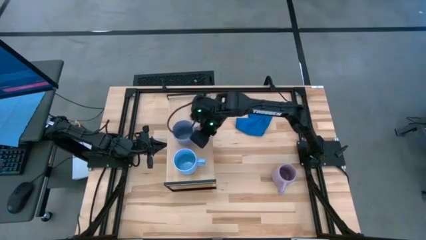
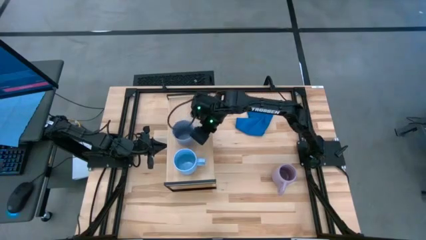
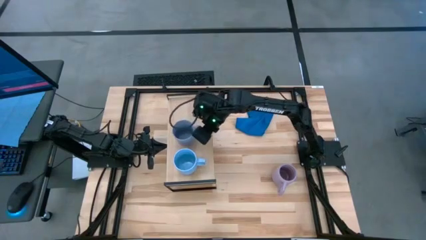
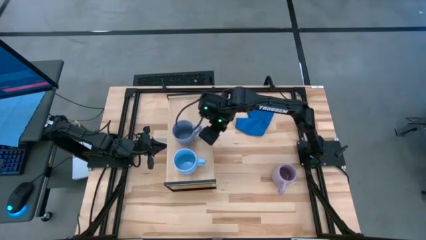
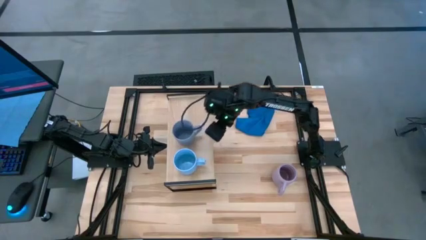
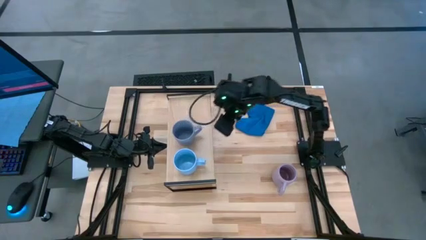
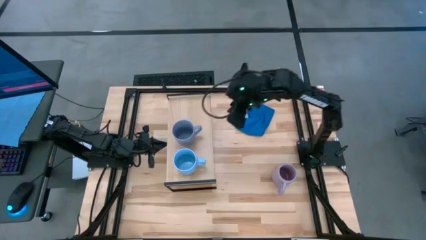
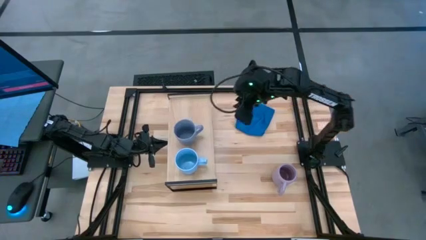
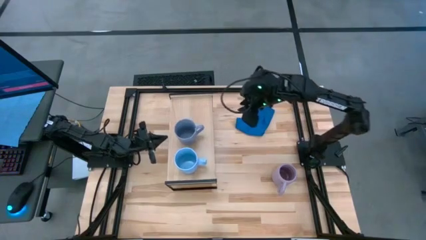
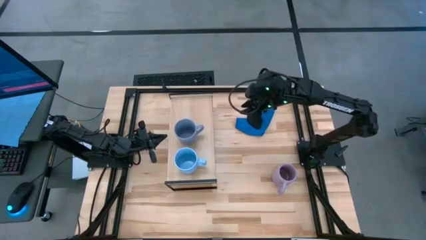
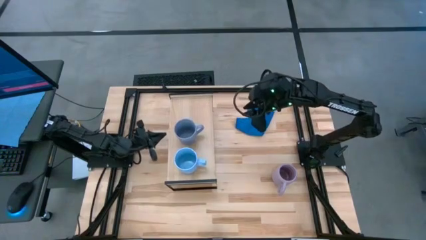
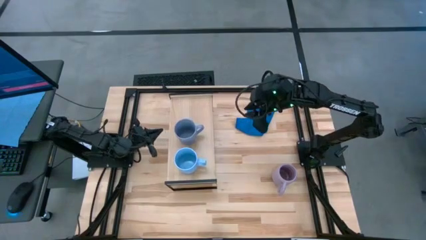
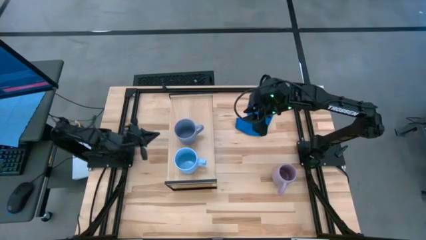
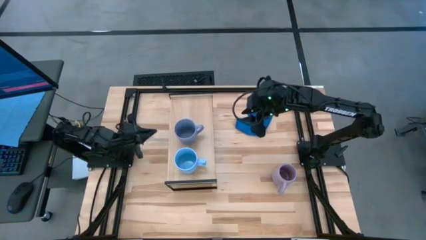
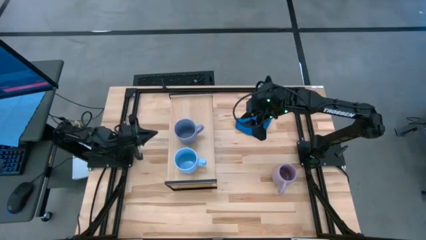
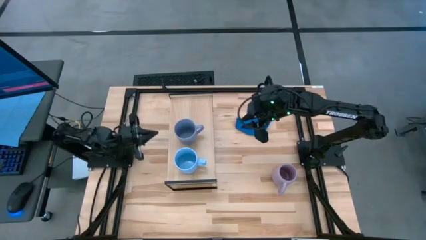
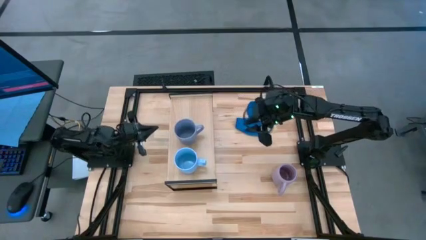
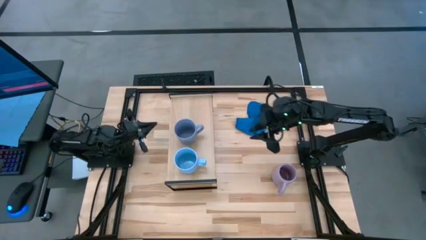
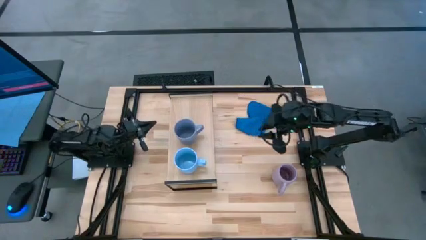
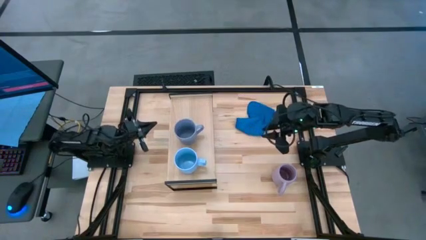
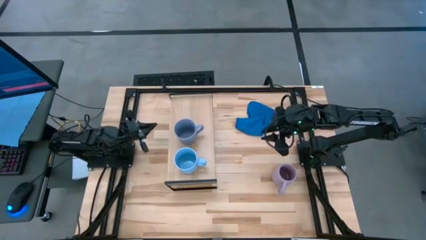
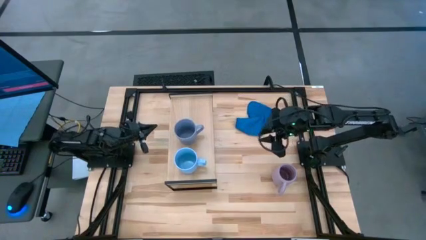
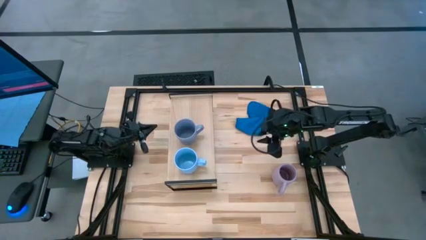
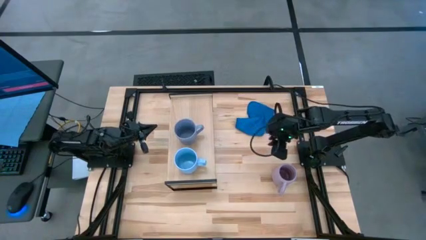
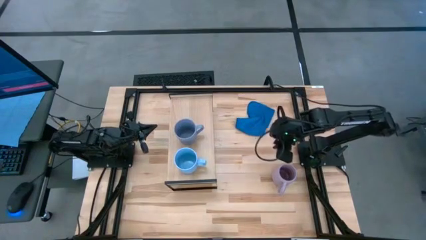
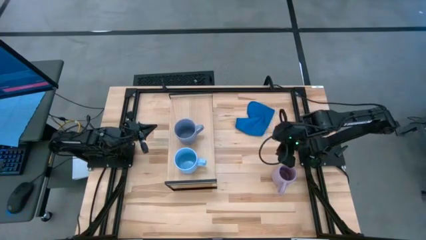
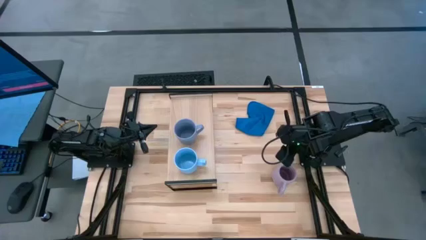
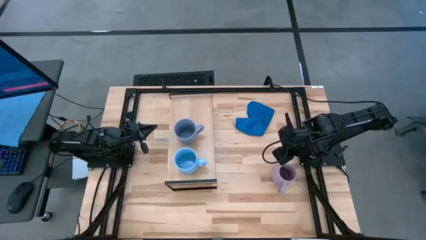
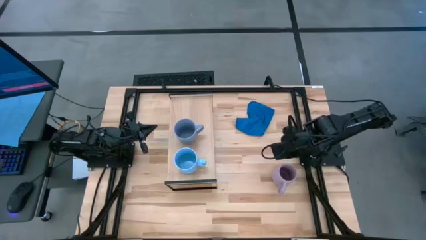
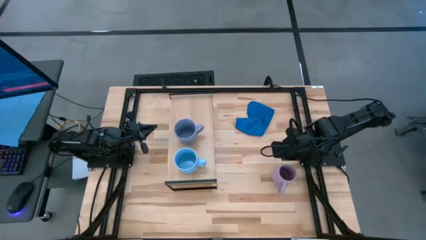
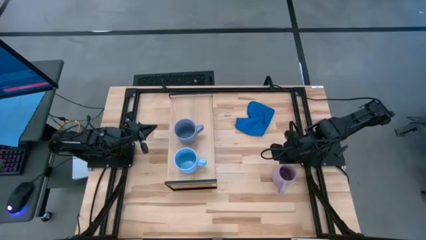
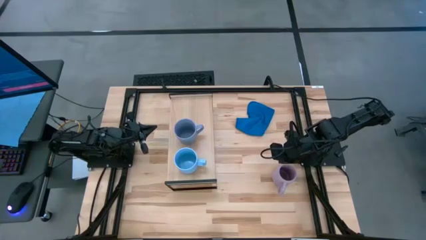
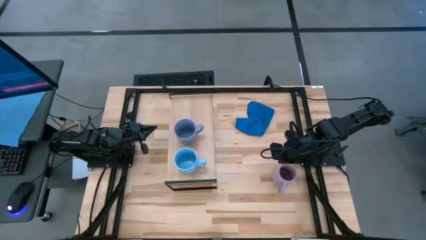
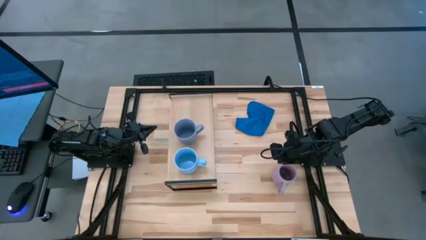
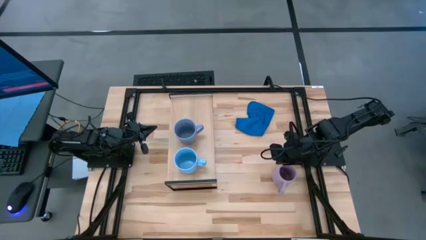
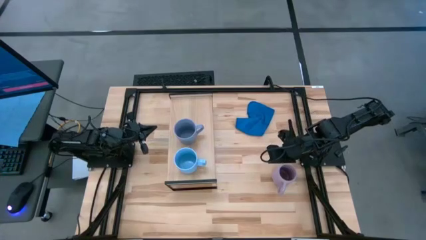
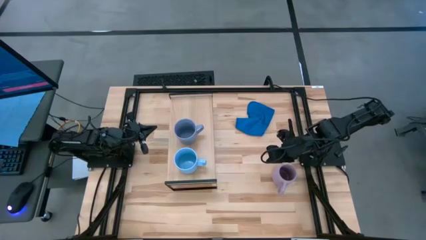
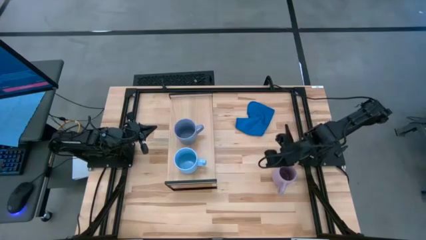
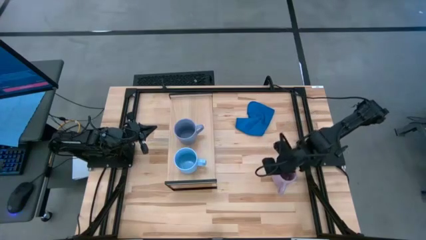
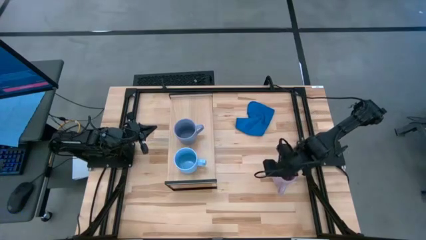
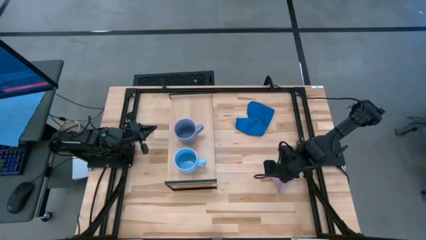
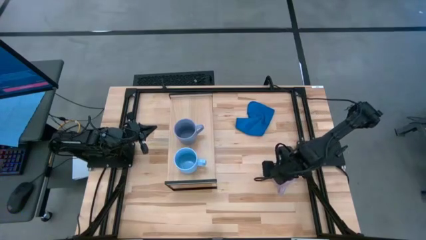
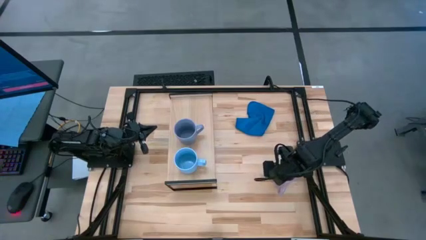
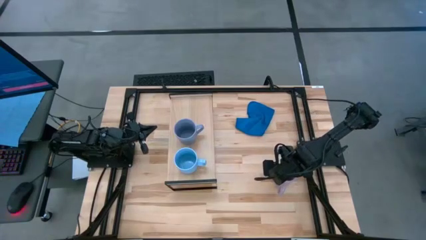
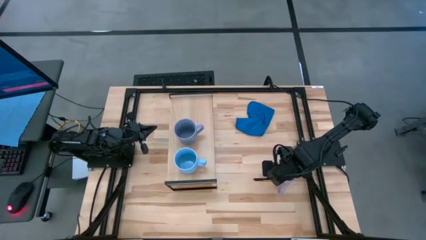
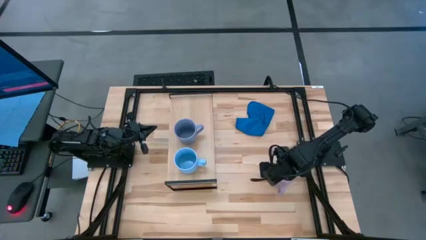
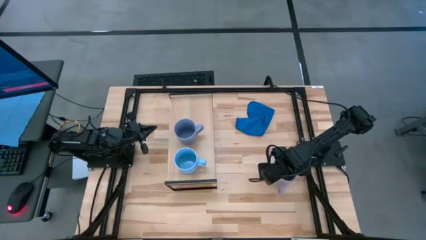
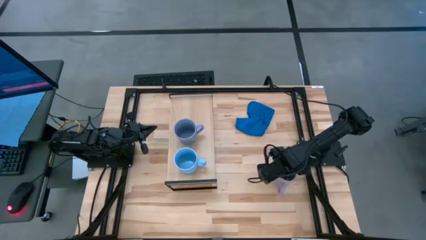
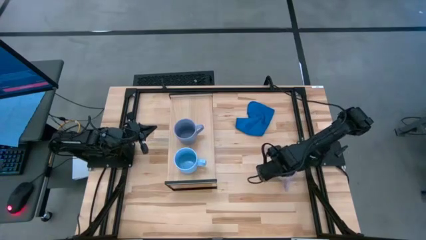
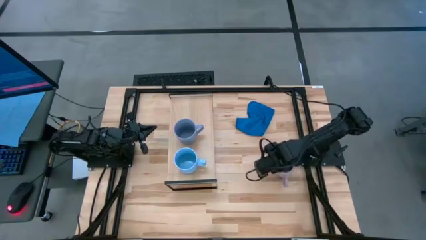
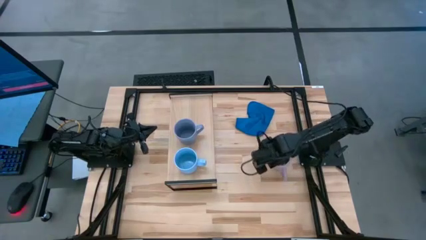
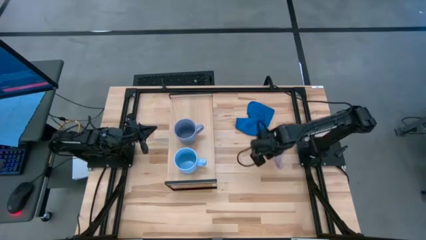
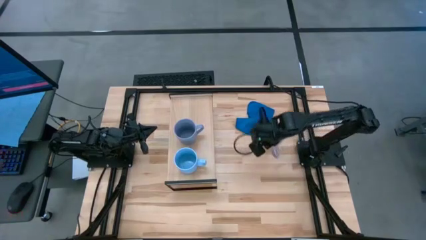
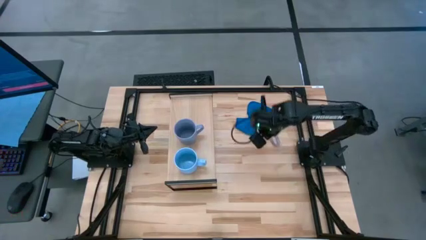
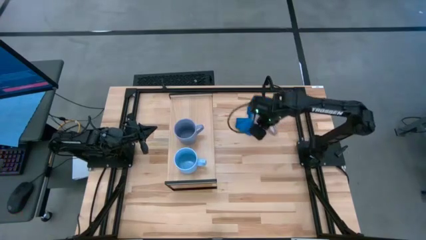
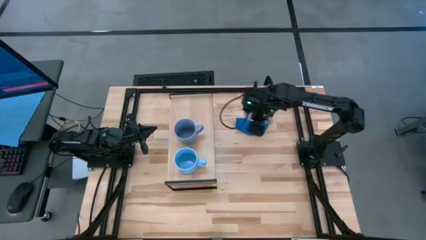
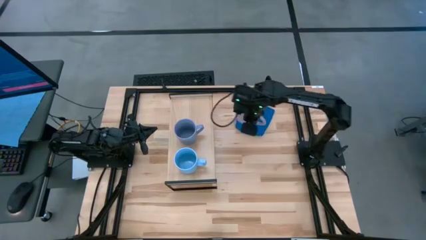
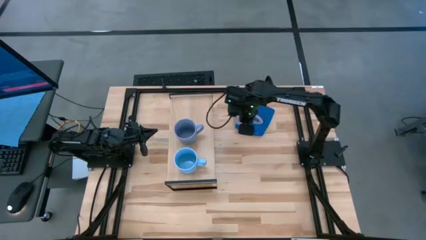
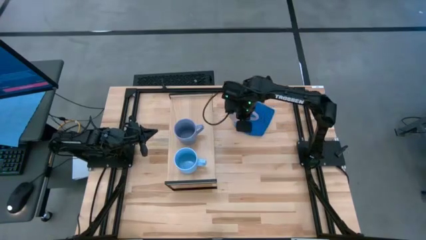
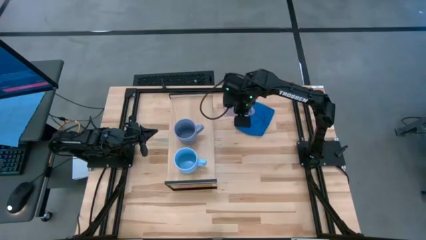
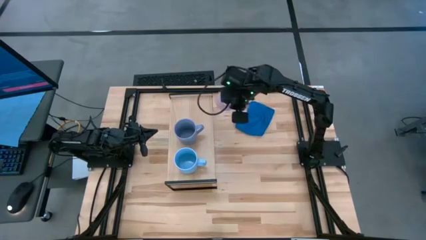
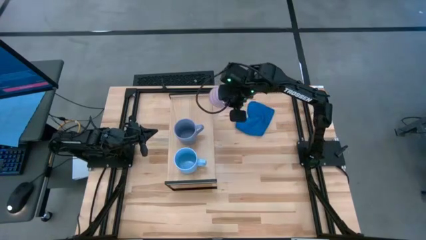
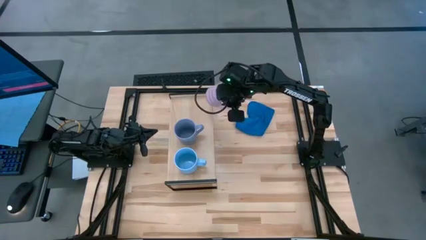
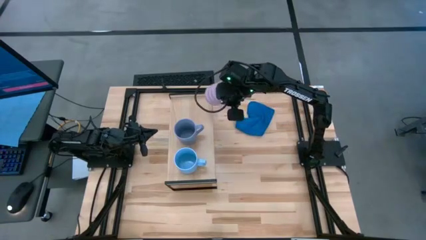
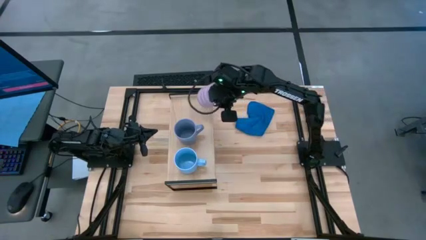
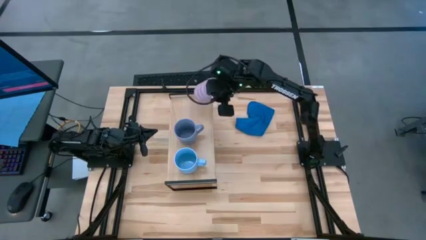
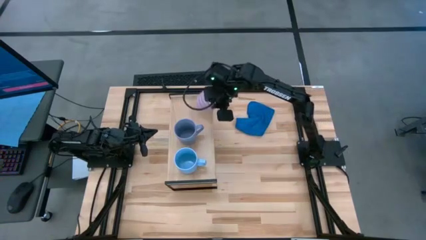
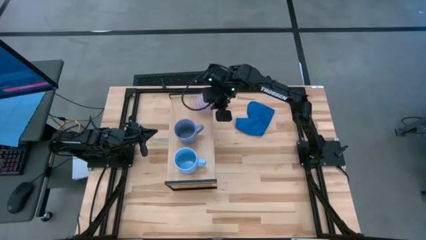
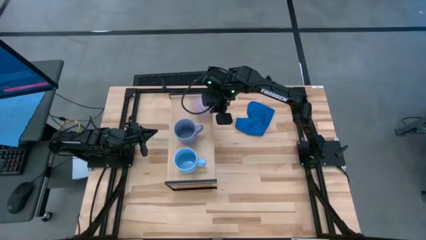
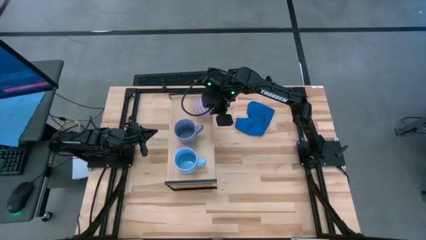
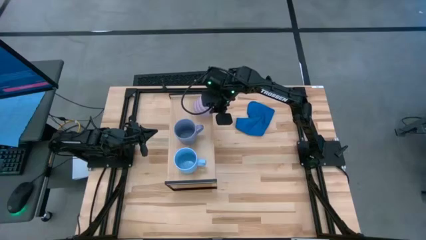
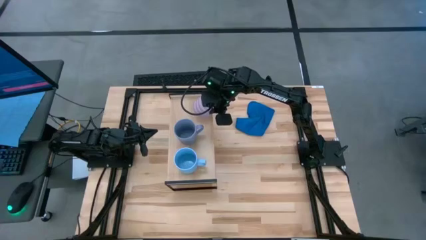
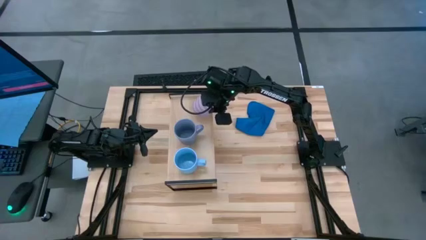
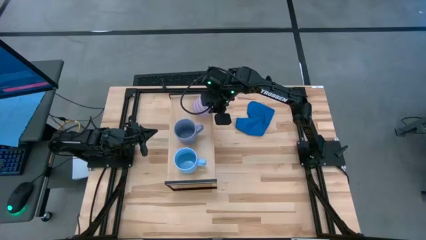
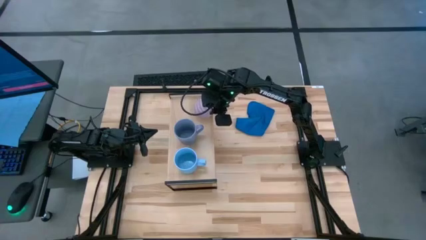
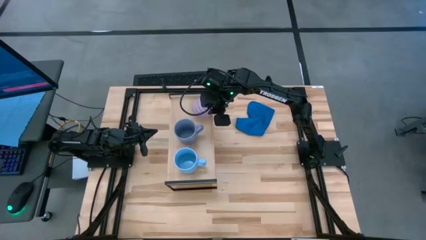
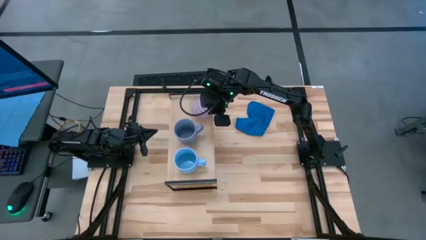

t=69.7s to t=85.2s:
Task: Stack small to large cups/mugs on shelf
Put the light purple mug on the shelf
